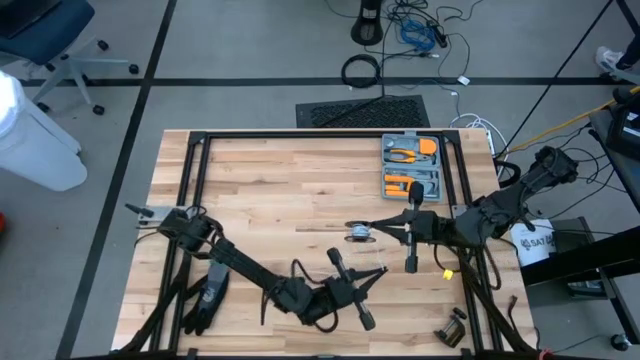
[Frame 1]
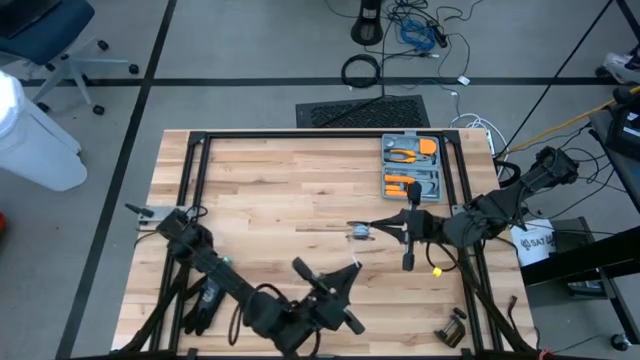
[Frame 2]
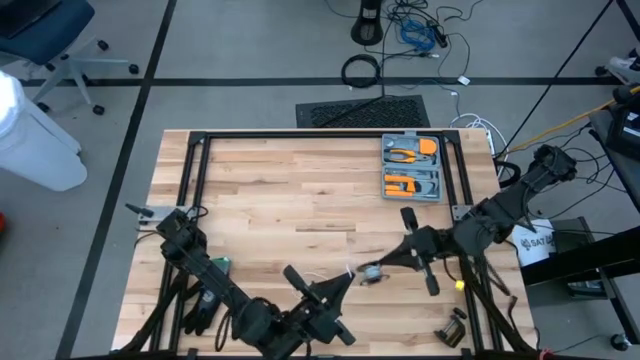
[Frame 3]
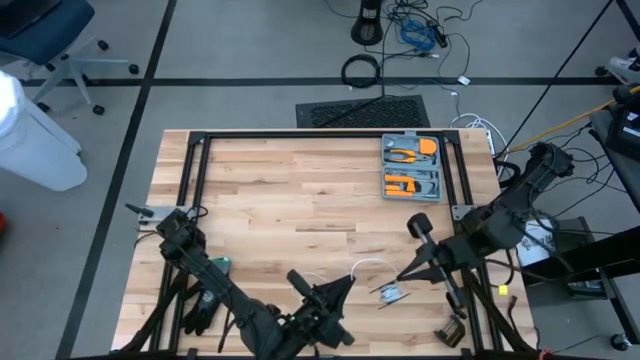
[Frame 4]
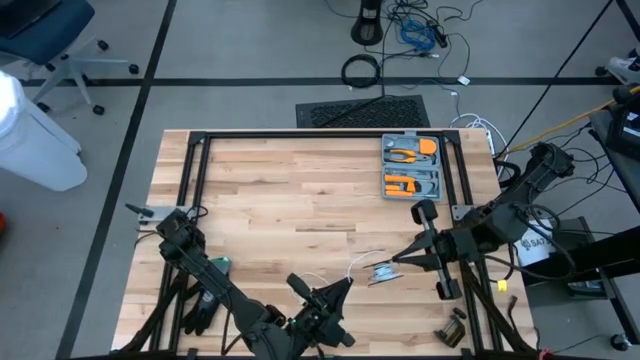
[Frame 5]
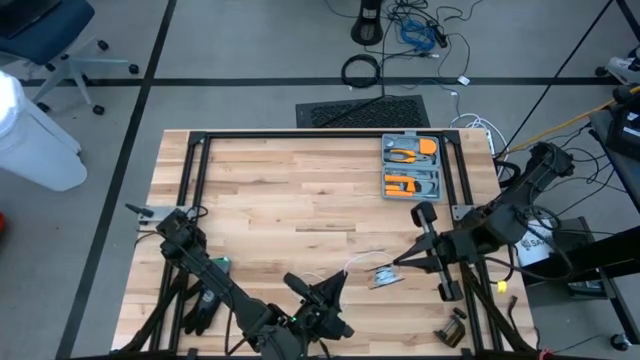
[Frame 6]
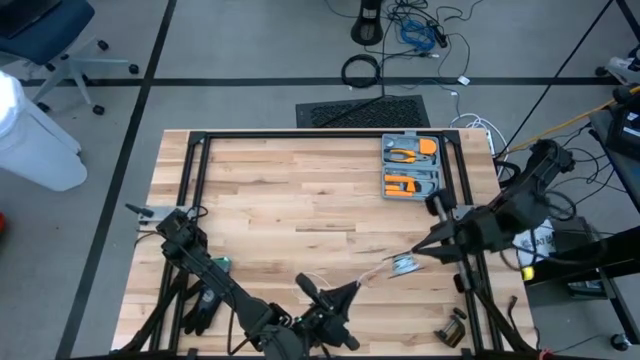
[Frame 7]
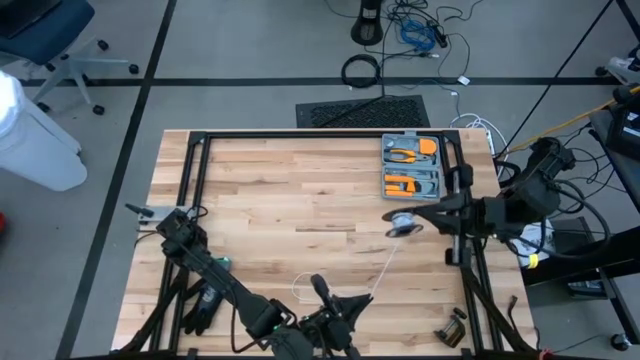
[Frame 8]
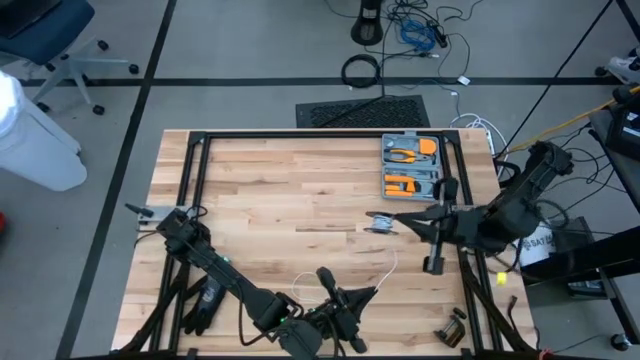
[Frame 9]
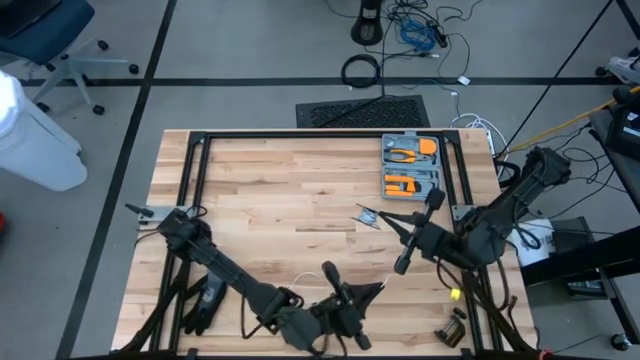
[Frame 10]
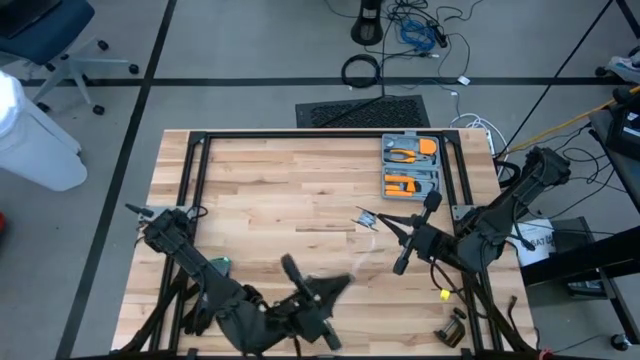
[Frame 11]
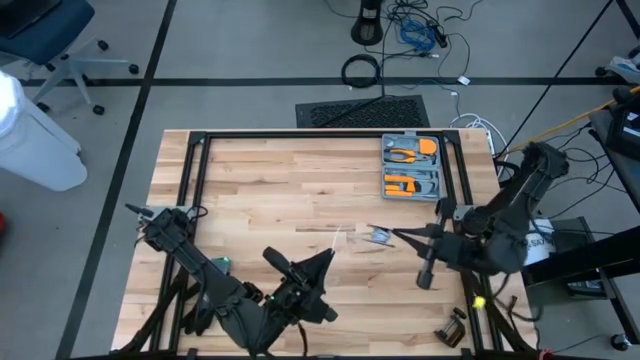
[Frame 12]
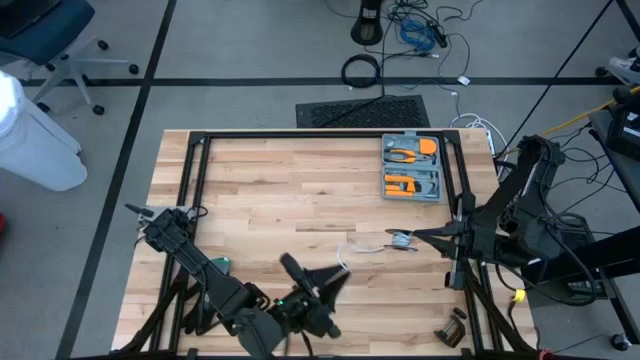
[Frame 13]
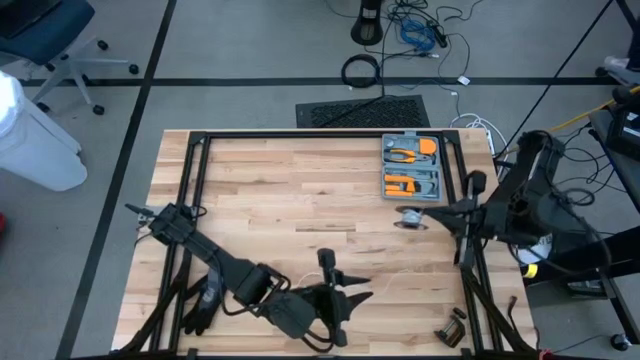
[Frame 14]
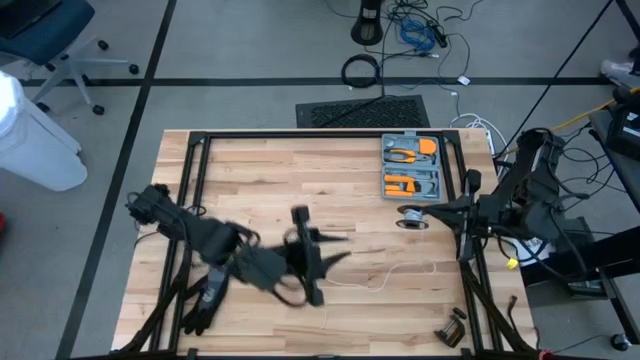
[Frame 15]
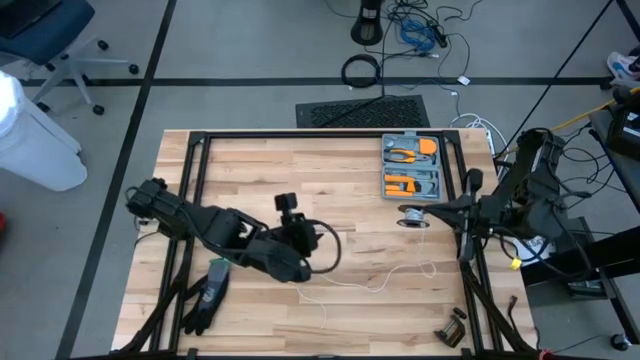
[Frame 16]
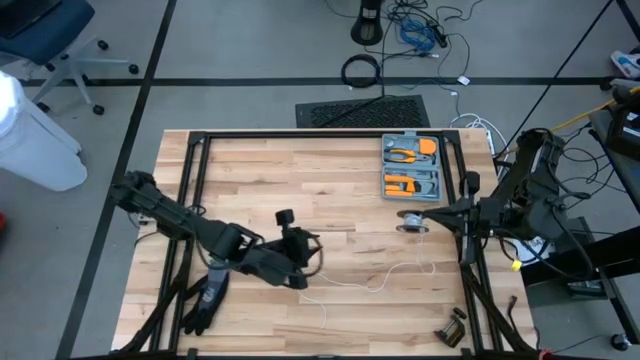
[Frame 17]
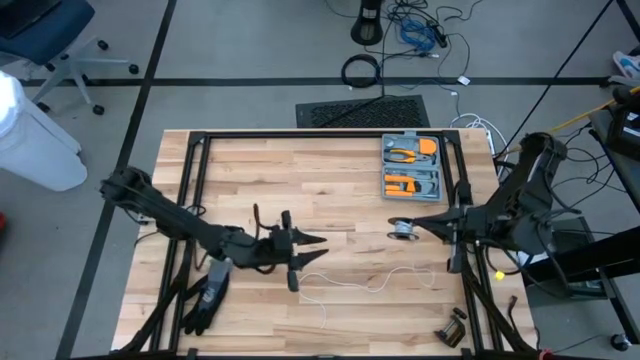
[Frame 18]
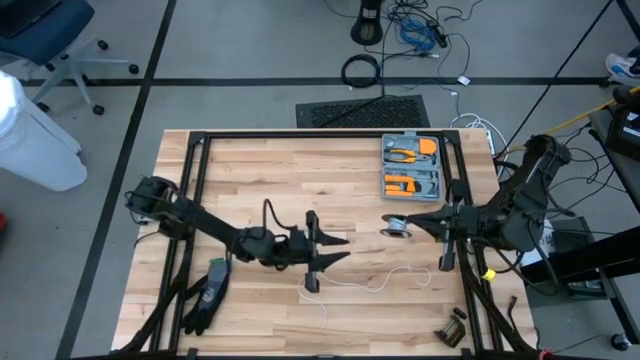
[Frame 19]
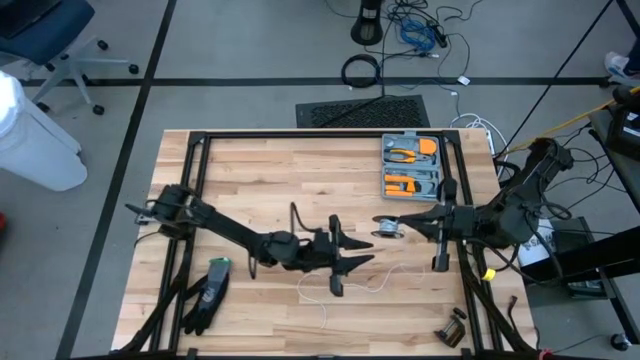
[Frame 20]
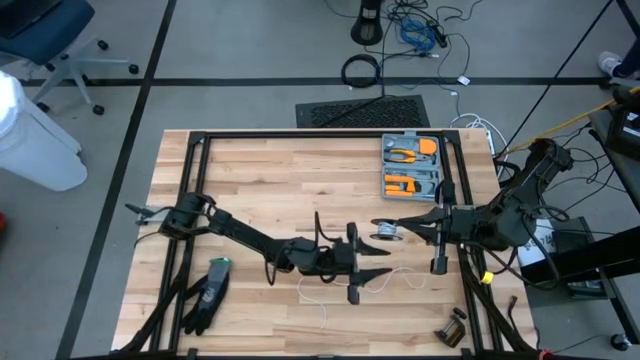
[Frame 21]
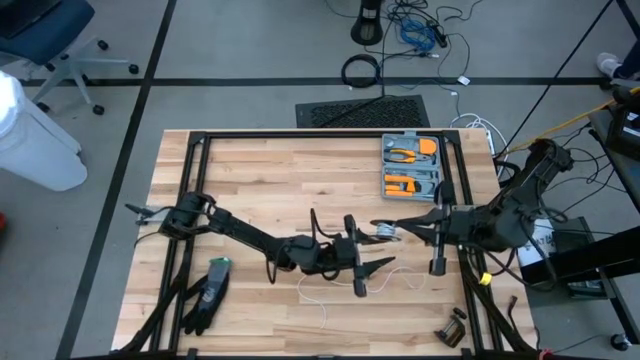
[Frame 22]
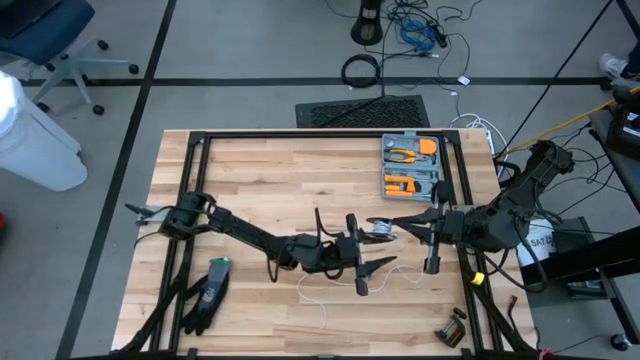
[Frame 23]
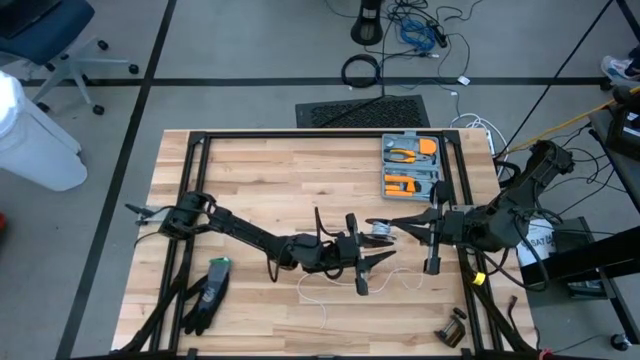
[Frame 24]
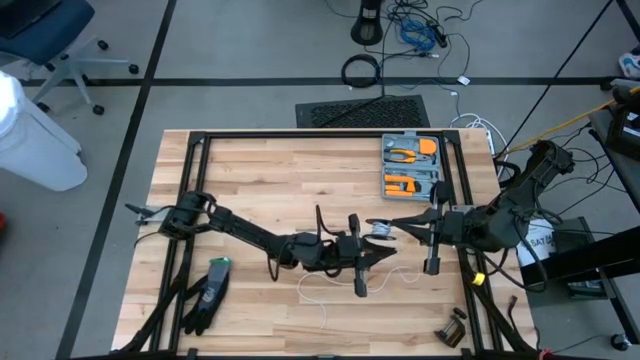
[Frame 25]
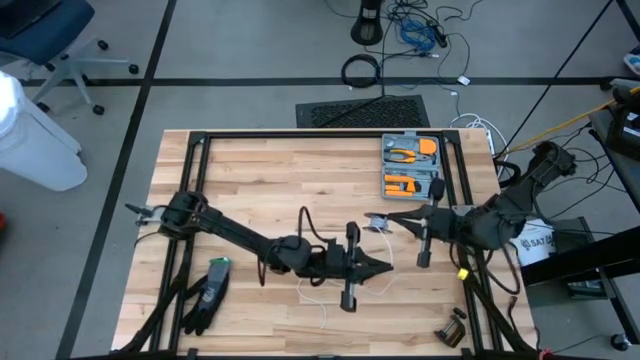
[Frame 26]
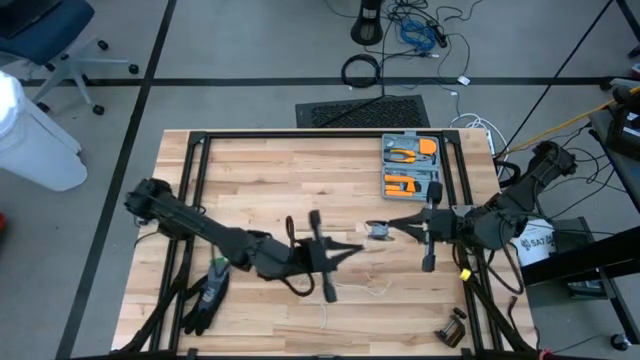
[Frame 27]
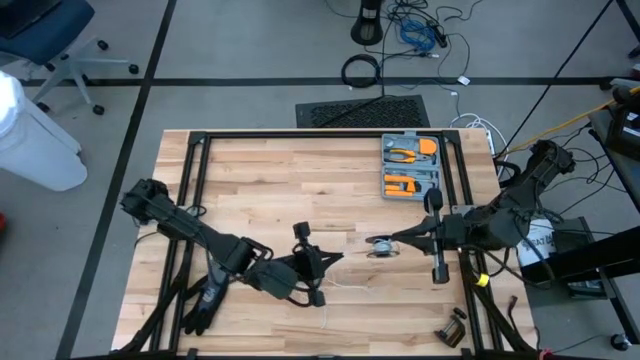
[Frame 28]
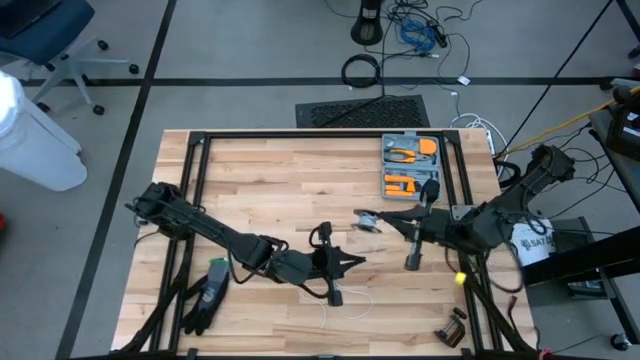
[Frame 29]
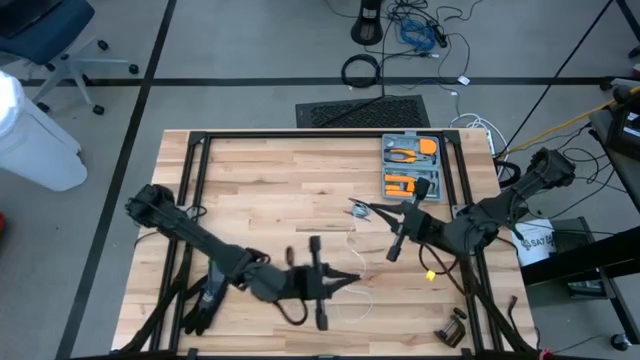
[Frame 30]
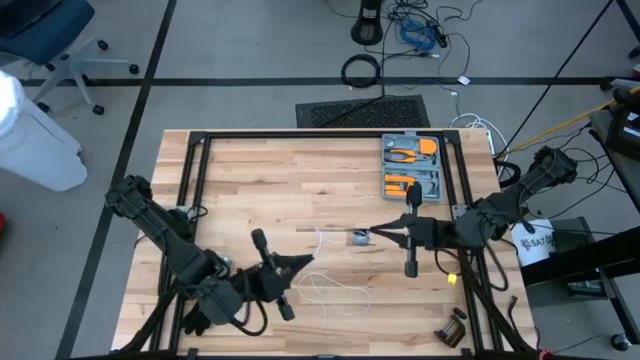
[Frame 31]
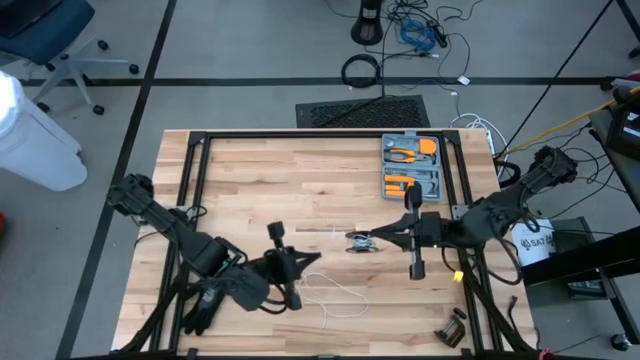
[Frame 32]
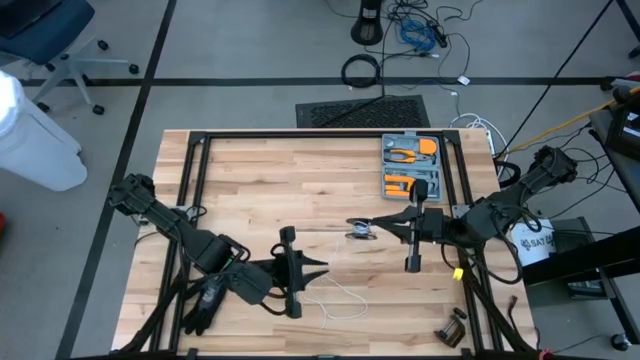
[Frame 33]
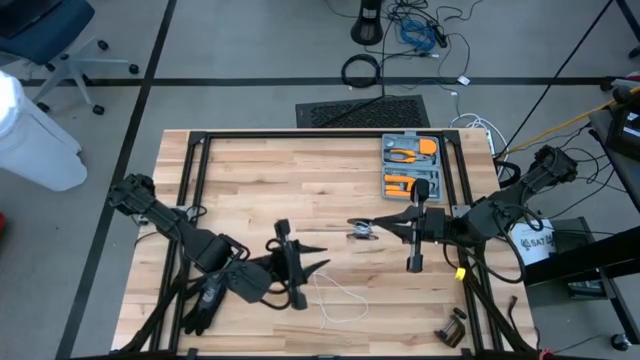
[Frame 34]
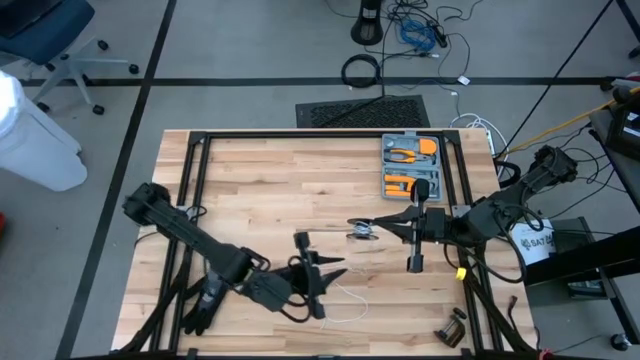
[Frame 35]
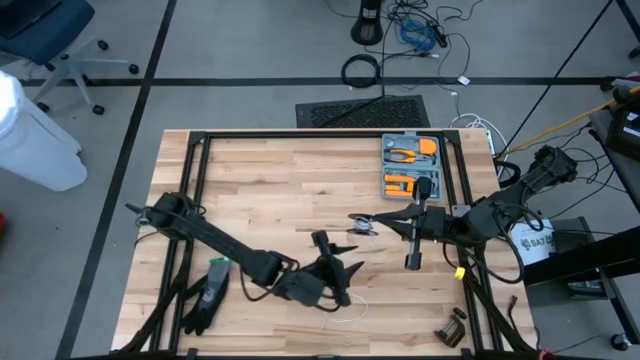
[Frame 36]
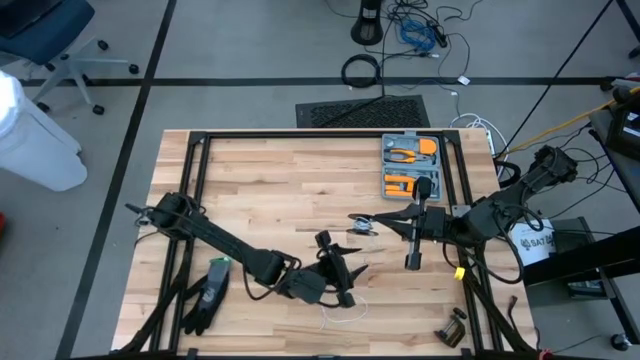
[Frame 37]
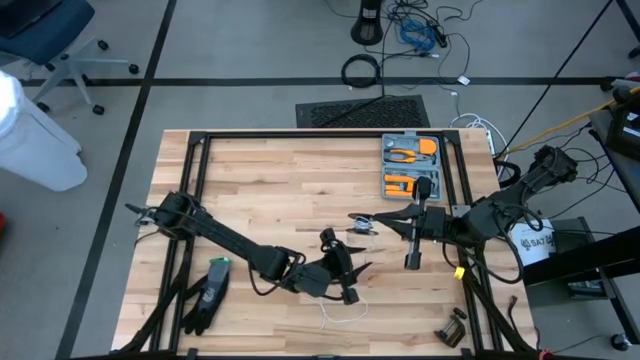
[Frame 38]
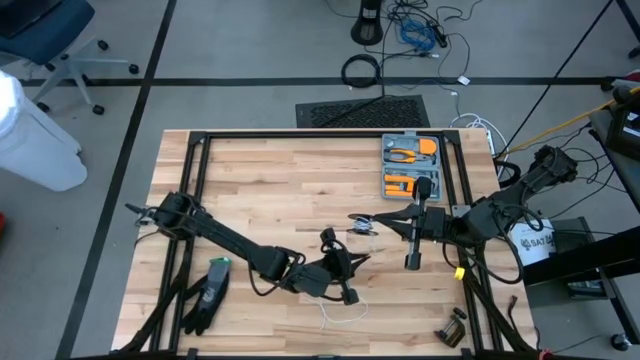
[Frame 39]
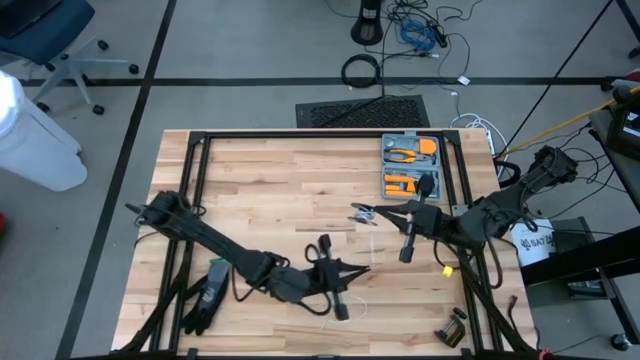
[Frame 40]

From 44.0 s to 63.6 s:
Task: Coil cords
Uncoil the white wire from the spool
